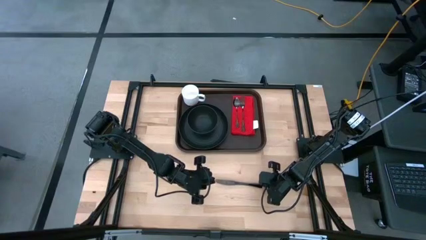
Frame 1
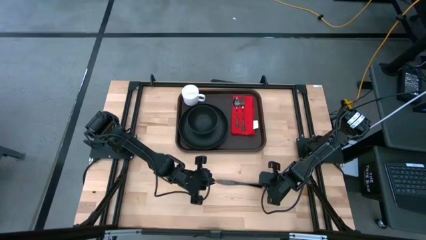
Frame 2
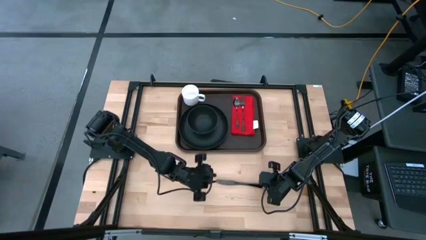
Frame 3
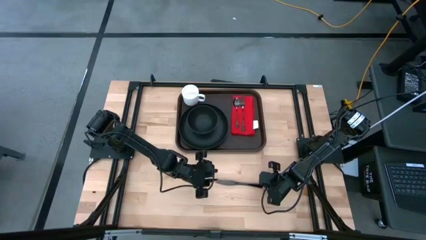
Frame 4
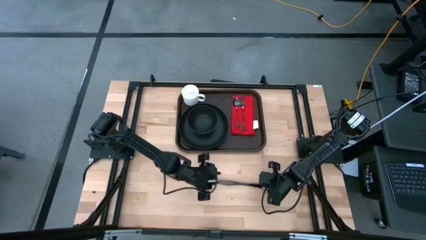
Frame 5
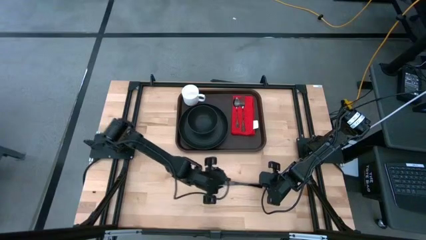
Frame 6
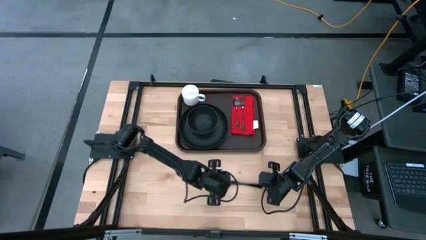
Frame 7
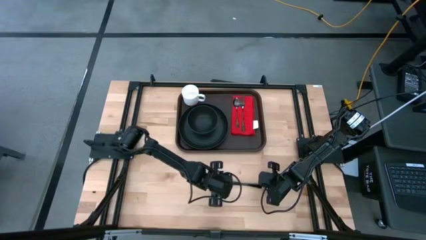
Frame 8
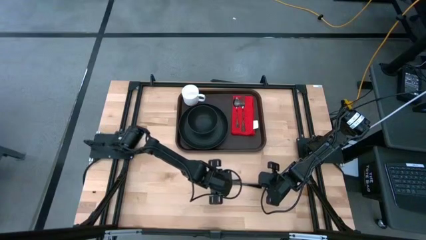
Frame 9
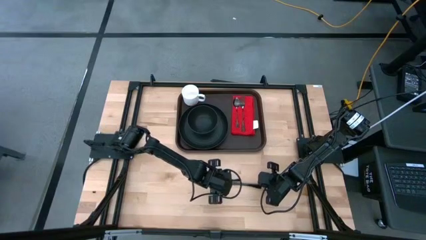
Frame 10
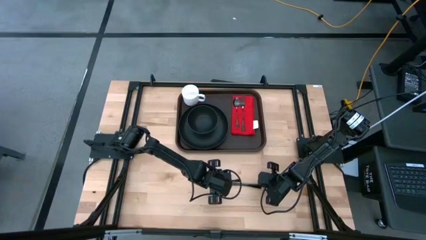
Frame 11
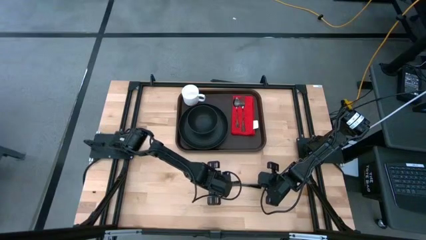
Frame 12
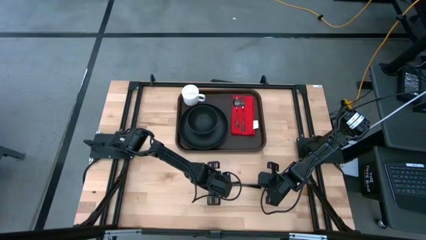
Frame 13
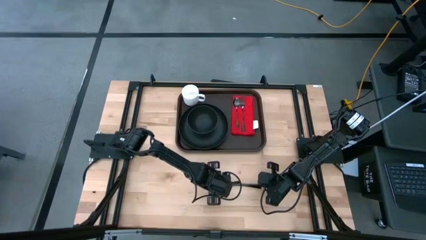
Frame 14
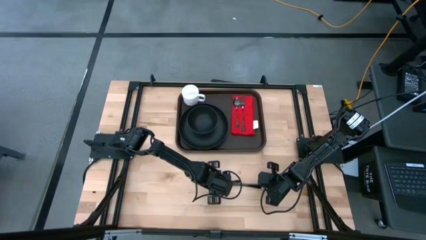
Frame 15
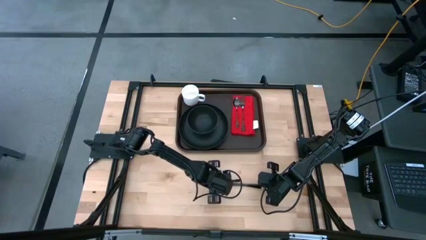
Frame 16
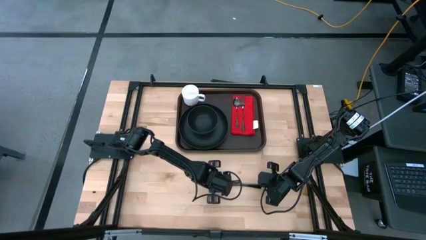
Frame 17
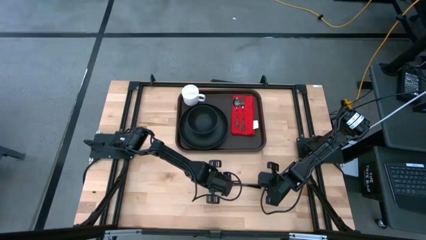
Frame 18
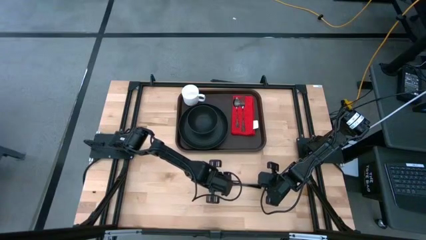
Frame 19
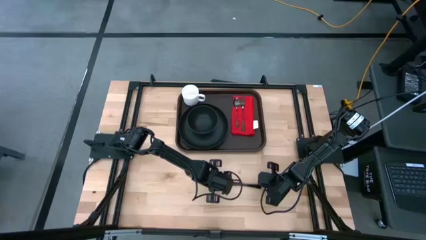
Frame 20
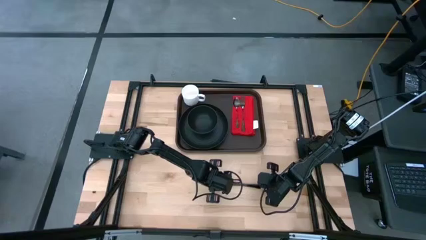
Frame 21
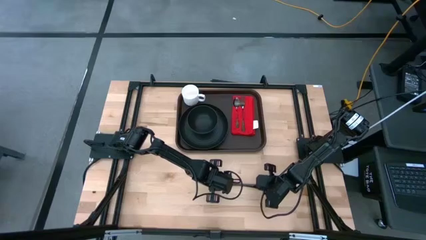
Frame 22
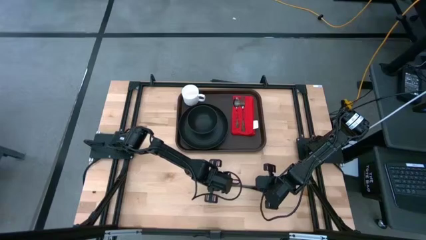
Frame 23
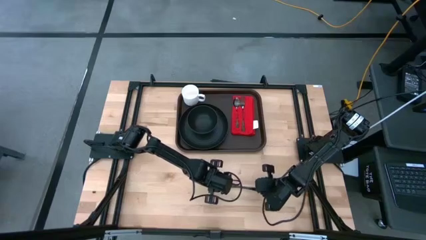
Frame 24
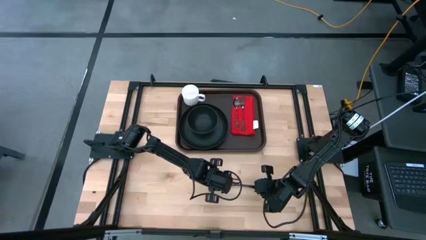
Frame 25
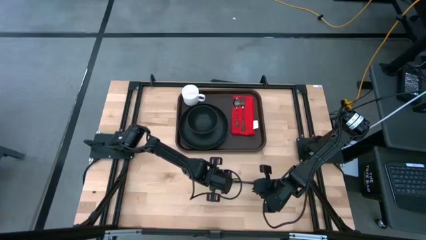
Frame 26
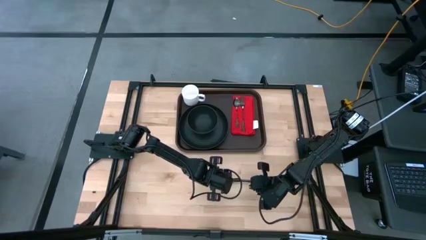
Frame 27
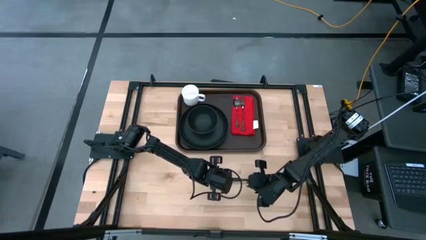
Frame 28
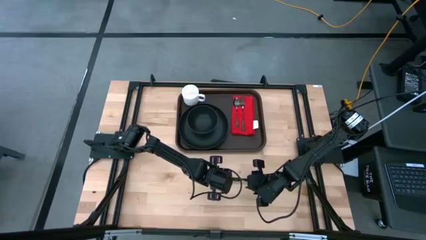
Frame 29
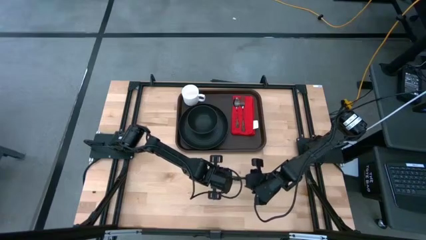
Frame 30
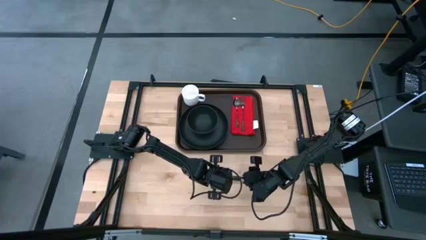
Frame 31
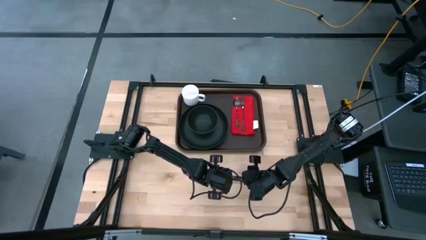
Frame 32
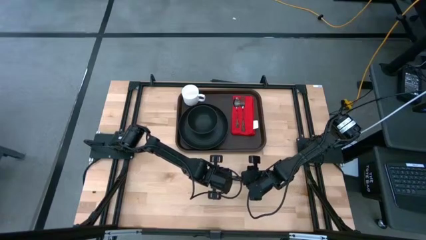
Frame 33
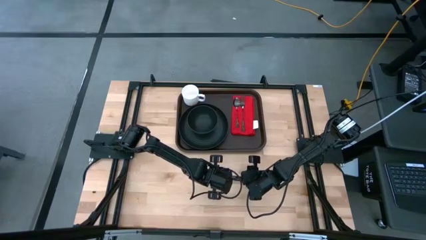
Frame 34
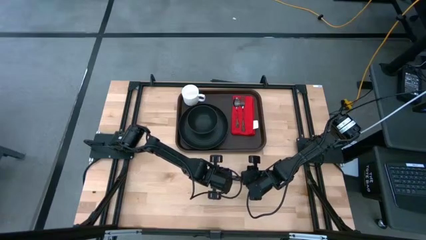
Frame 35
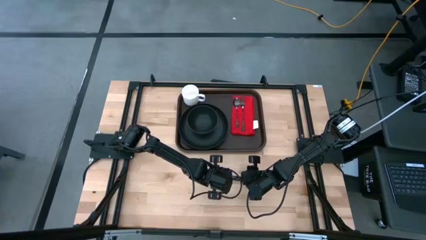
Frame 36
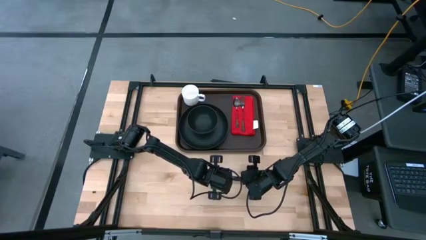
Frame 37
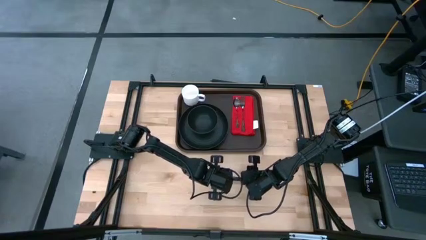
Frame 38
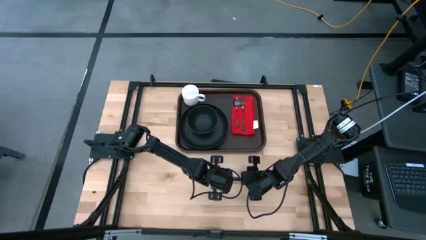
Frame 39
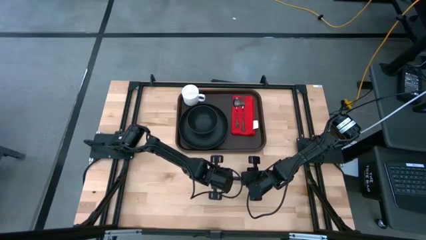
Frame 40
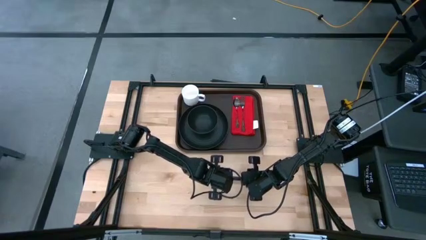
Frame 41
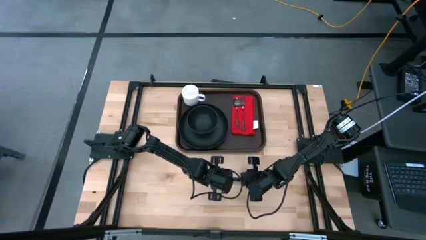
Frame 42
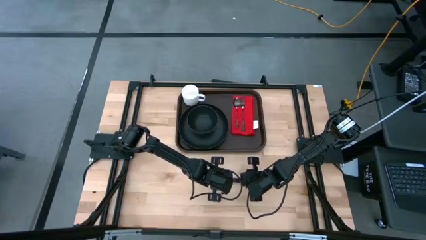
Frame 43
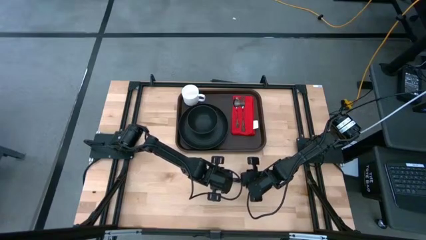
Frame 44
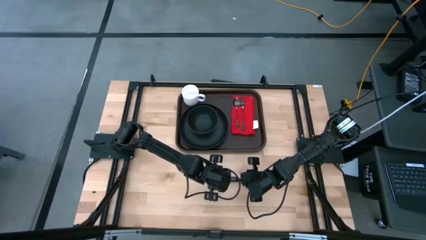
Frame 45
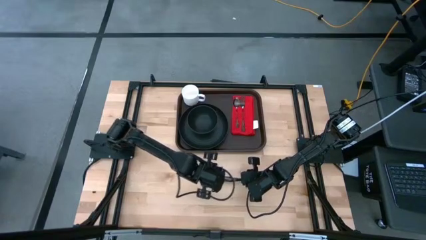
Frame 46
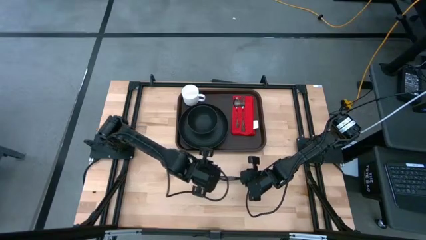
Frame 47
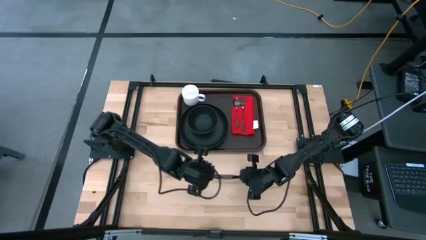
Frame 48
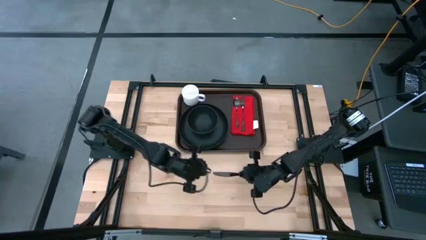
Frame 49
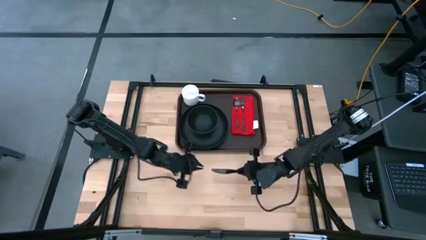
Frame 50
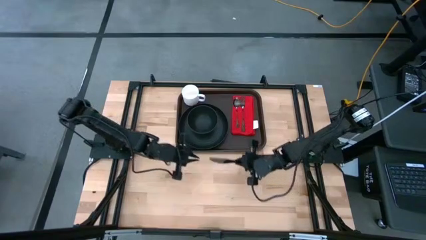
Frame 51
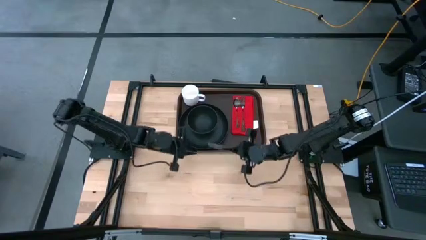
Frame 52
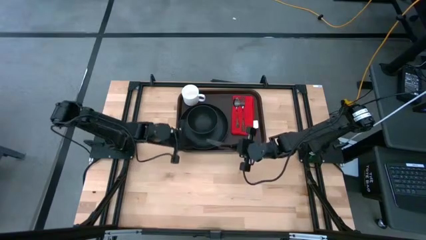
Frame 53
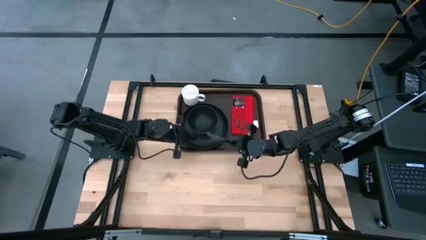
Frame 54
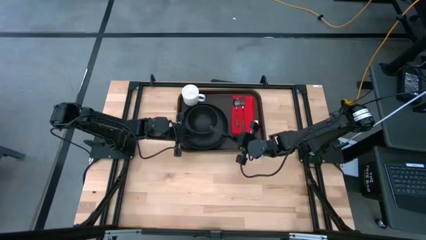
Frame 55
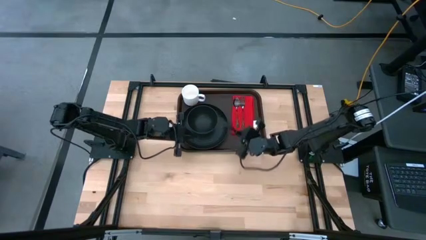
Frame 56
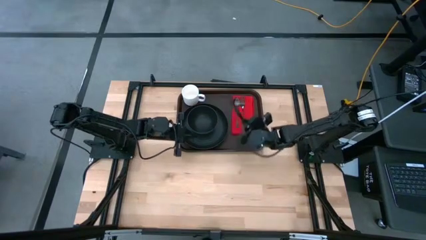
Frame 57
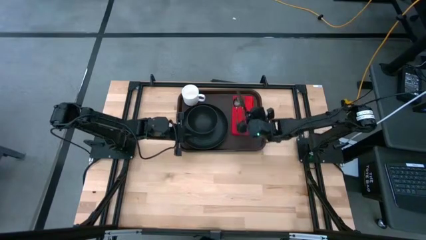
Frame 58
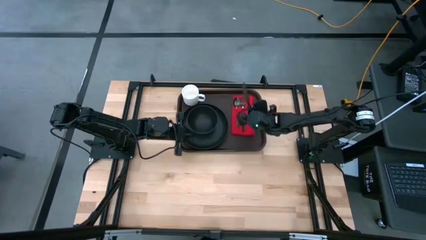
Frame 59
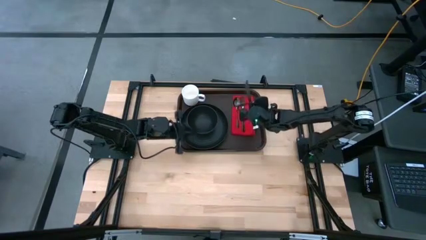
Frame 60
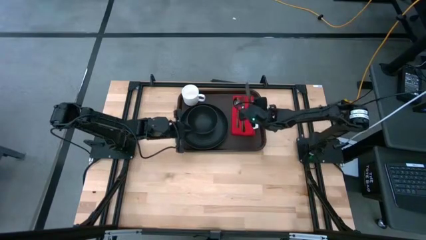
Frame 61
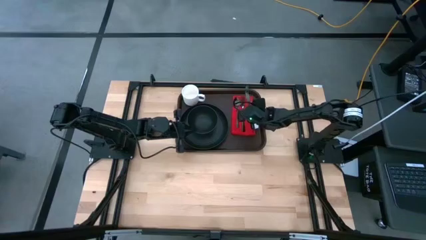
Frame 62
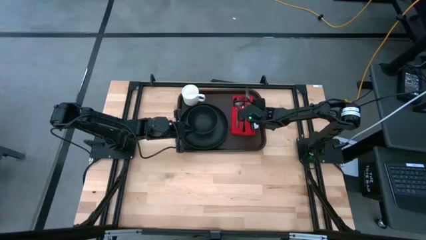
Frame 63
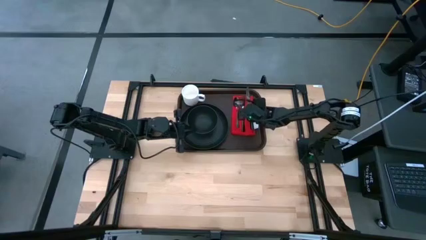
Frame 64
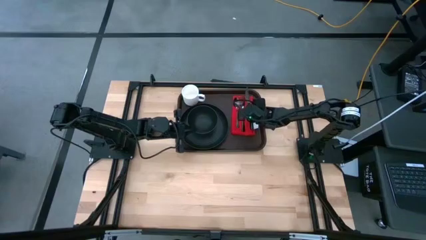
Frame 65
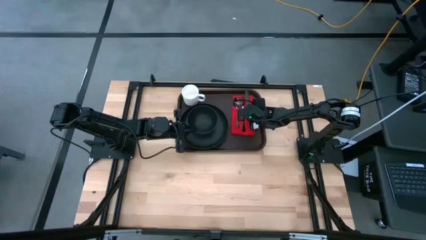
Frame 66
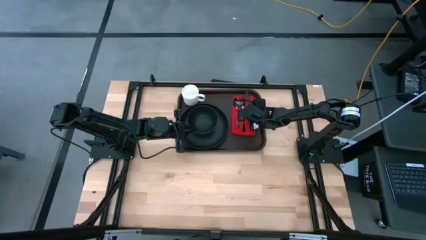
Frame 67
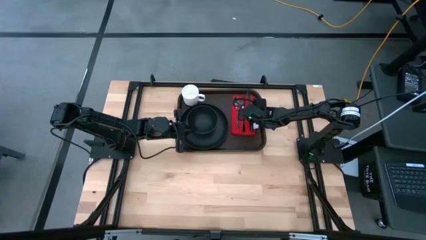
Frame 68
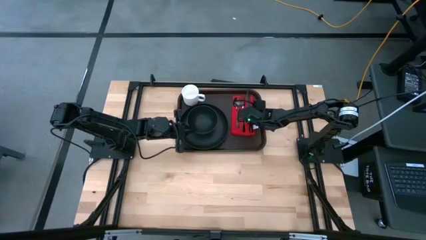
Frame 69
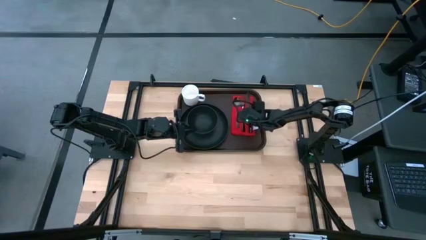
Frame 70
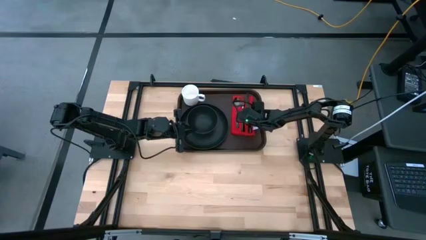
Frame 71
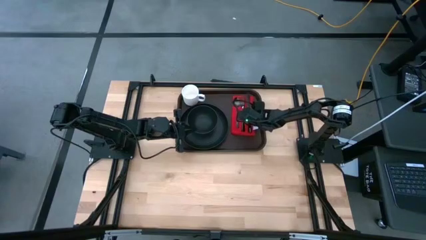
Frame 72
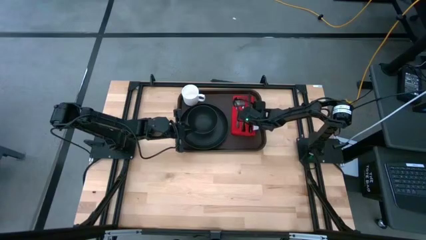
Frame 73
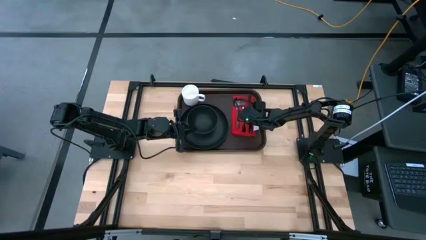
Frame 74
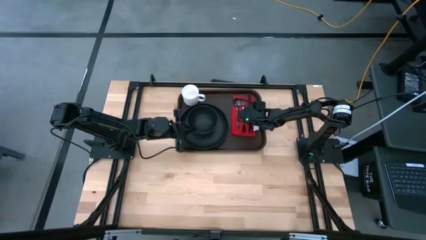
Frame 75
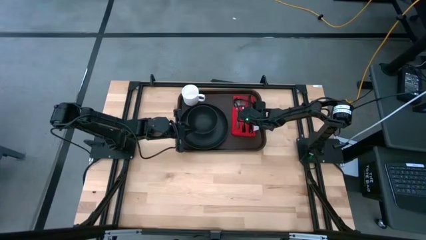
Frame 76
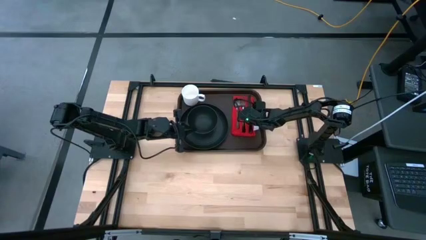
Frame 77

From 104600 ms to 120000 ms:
Task: Set up tray
Put the black table knife on the red napkin to the right of the black fork
